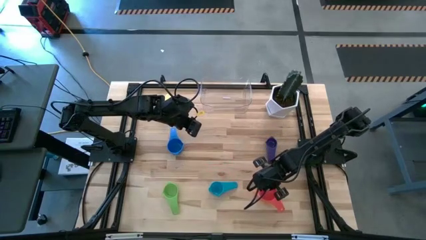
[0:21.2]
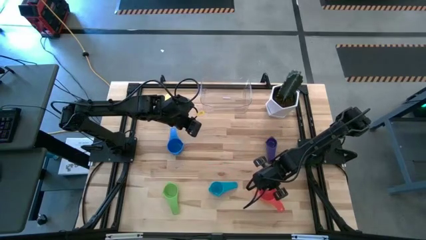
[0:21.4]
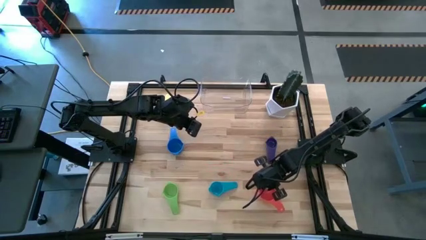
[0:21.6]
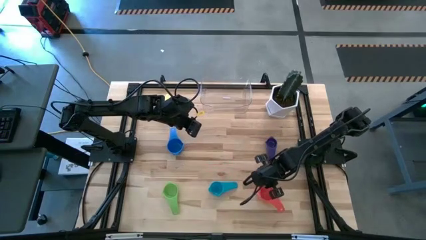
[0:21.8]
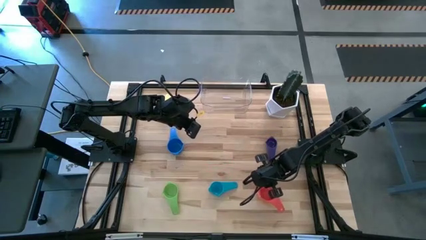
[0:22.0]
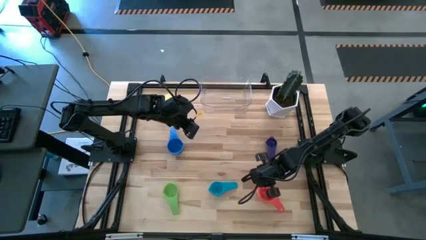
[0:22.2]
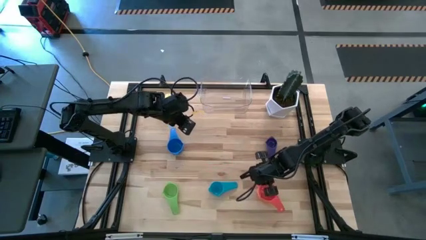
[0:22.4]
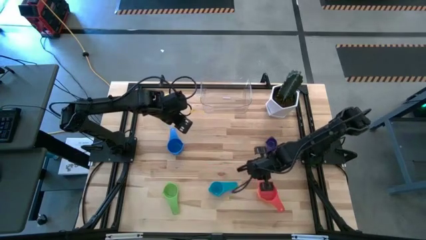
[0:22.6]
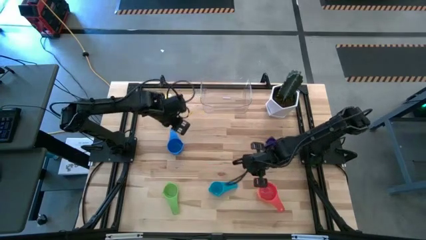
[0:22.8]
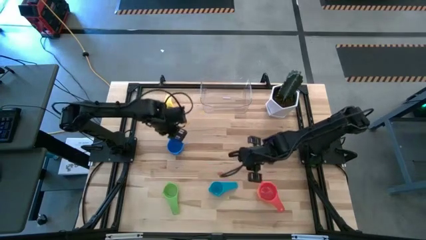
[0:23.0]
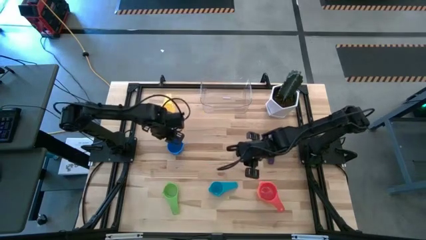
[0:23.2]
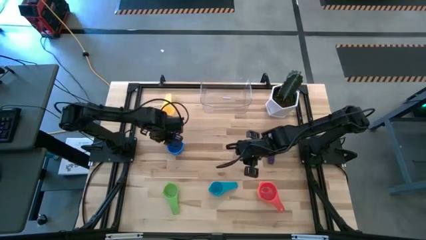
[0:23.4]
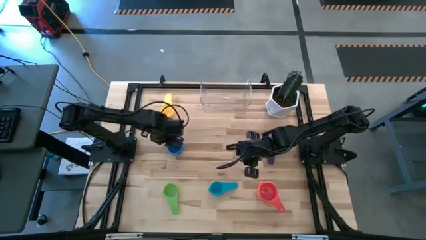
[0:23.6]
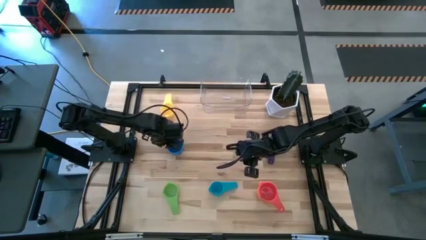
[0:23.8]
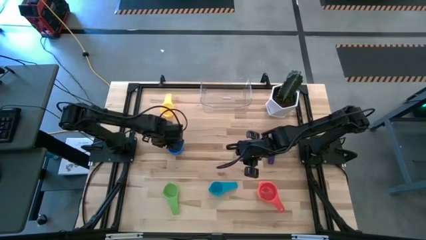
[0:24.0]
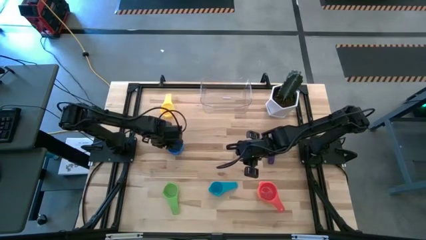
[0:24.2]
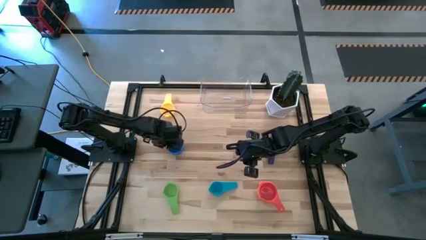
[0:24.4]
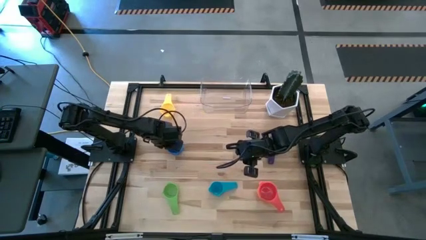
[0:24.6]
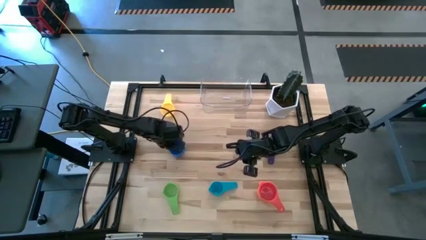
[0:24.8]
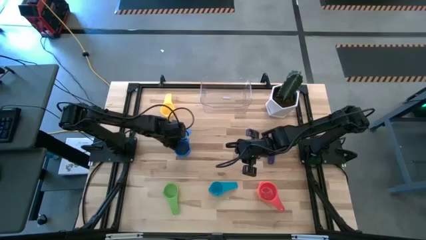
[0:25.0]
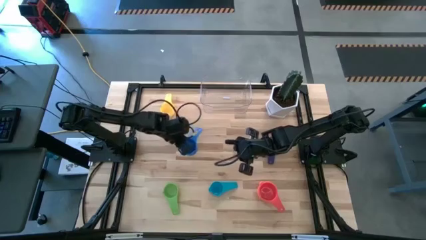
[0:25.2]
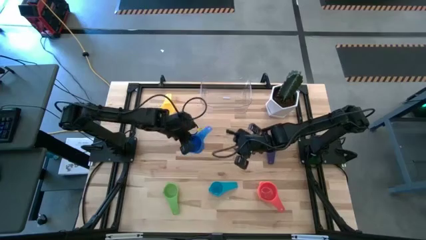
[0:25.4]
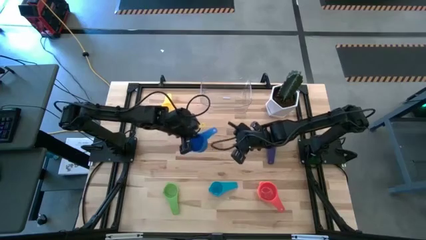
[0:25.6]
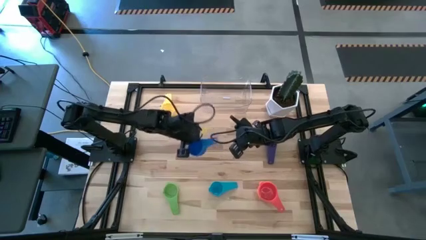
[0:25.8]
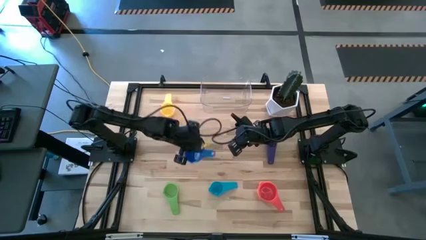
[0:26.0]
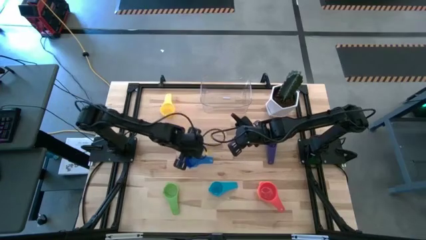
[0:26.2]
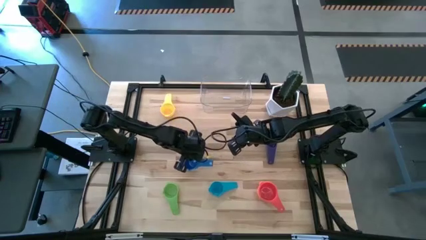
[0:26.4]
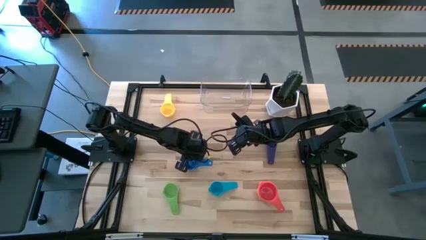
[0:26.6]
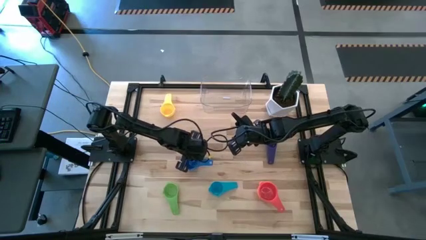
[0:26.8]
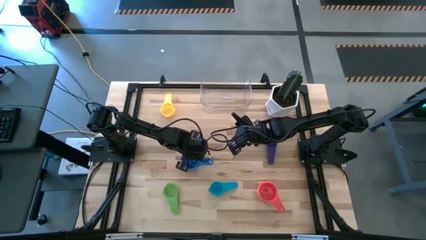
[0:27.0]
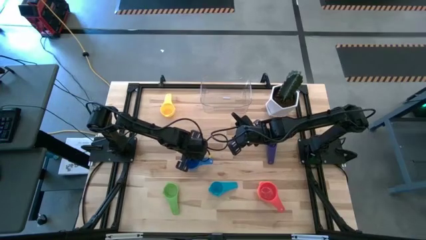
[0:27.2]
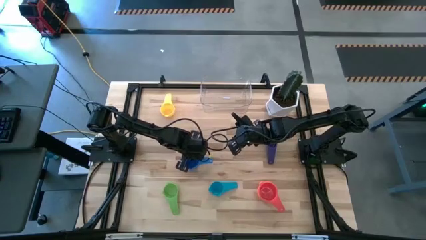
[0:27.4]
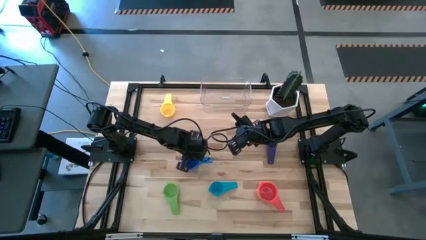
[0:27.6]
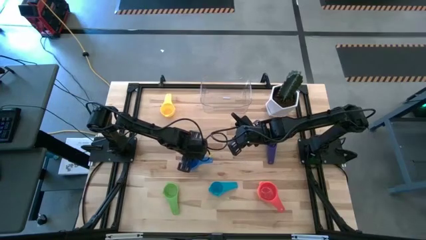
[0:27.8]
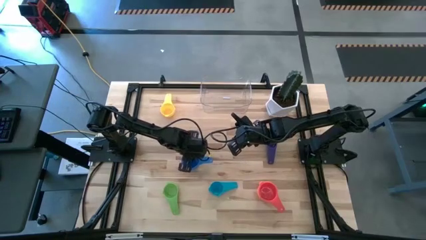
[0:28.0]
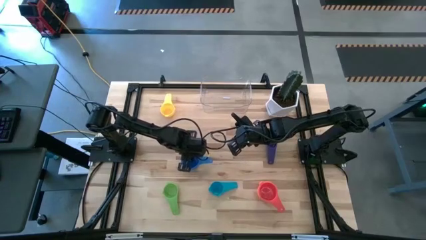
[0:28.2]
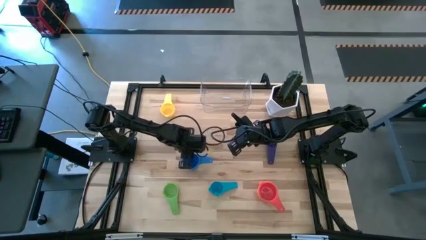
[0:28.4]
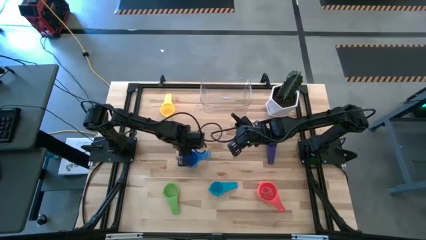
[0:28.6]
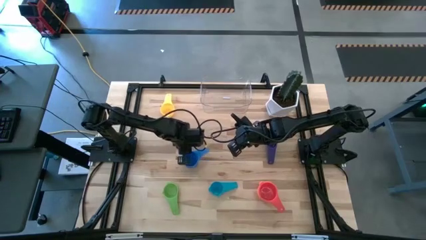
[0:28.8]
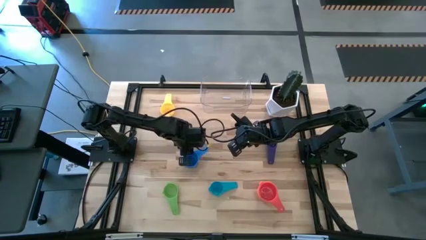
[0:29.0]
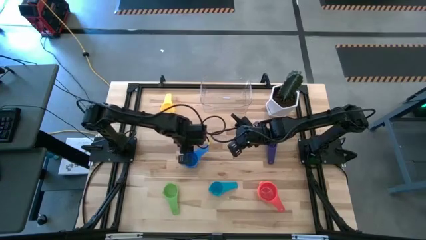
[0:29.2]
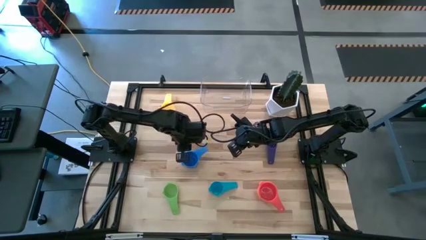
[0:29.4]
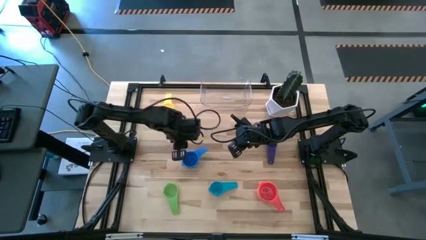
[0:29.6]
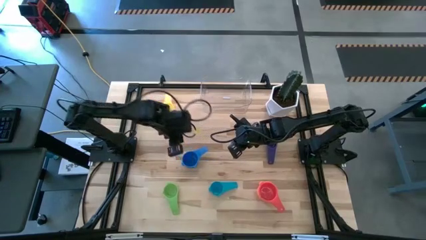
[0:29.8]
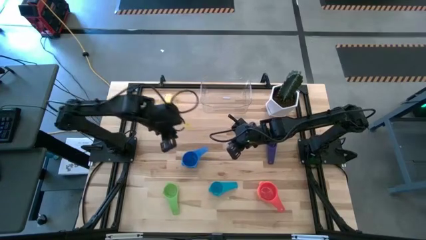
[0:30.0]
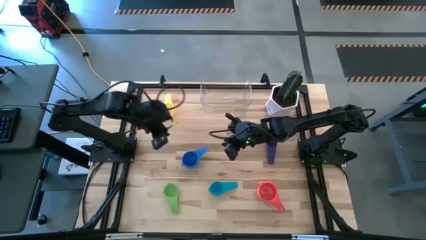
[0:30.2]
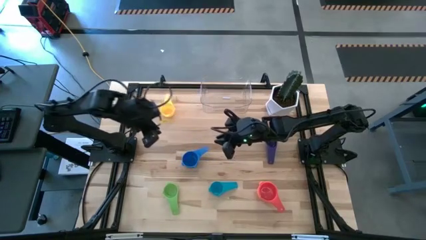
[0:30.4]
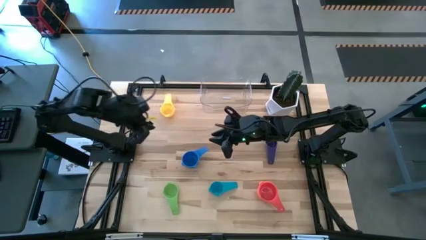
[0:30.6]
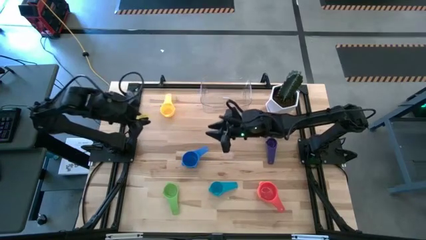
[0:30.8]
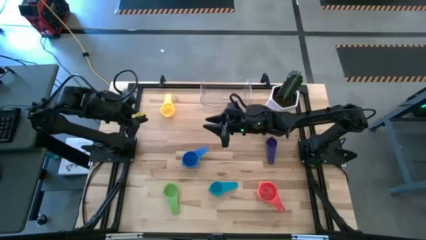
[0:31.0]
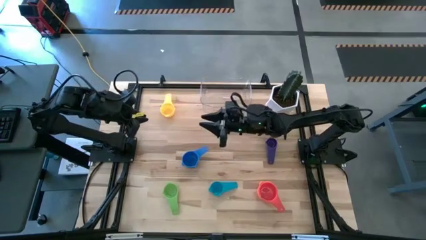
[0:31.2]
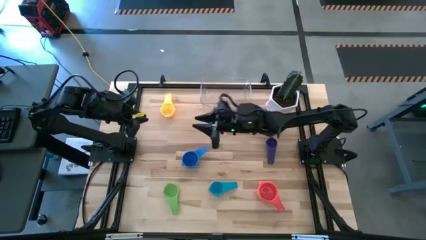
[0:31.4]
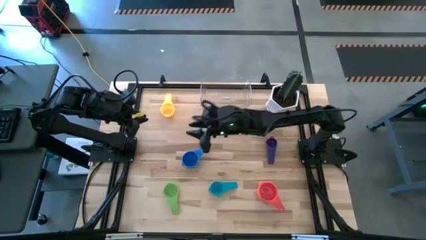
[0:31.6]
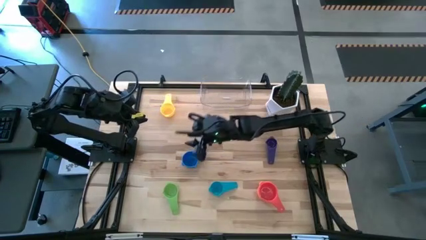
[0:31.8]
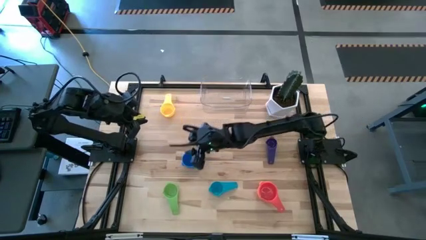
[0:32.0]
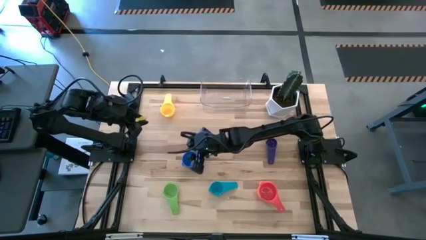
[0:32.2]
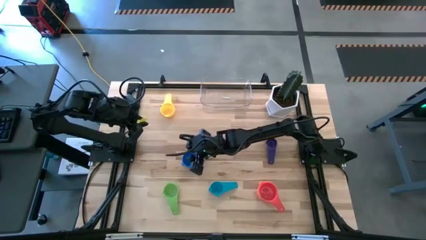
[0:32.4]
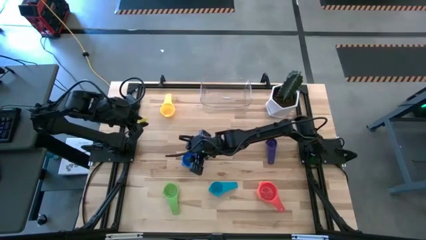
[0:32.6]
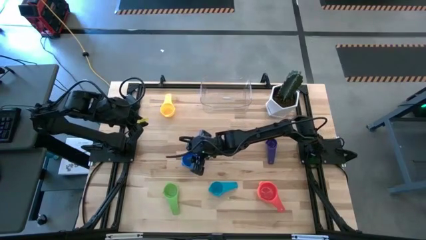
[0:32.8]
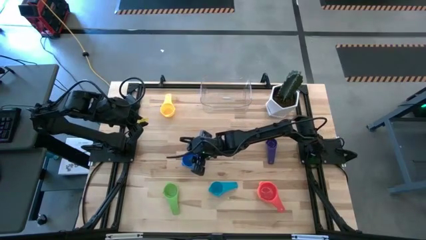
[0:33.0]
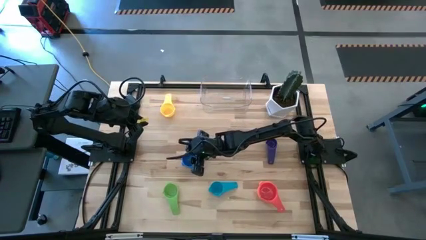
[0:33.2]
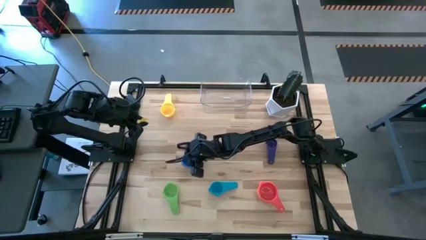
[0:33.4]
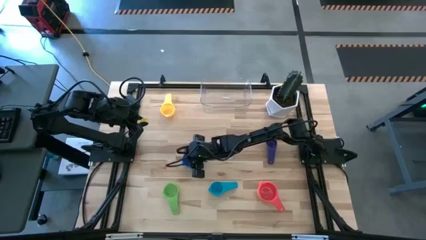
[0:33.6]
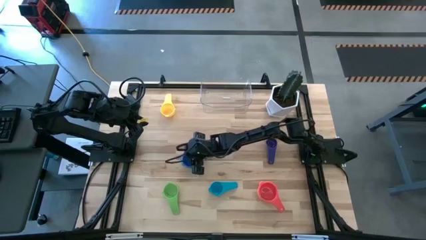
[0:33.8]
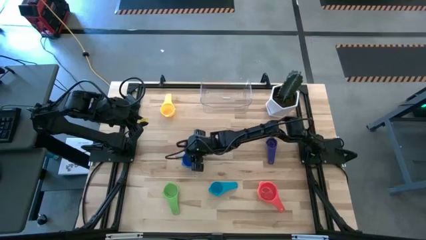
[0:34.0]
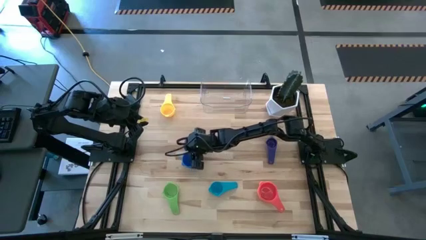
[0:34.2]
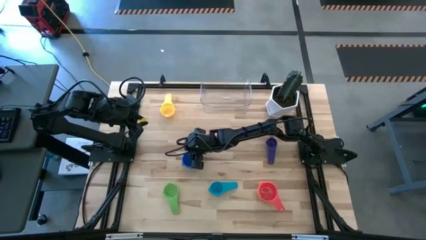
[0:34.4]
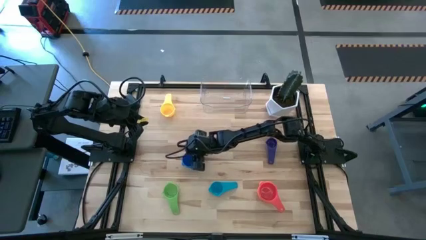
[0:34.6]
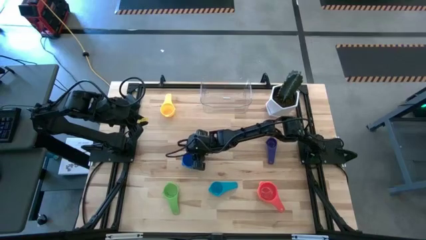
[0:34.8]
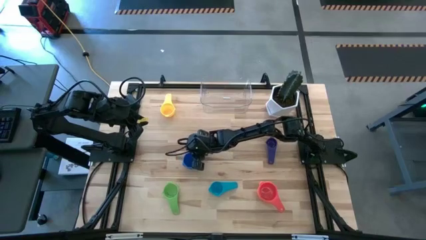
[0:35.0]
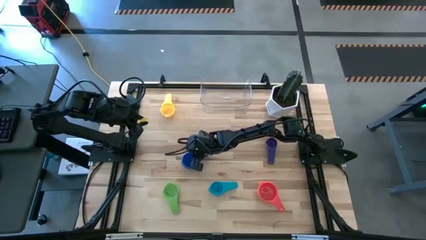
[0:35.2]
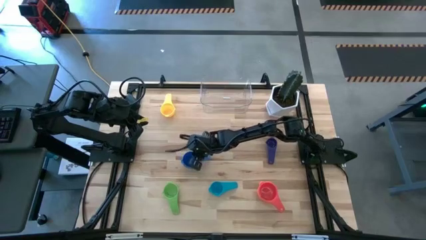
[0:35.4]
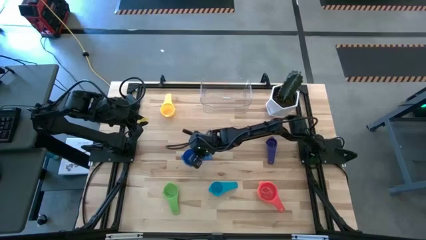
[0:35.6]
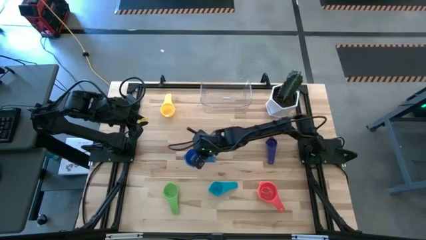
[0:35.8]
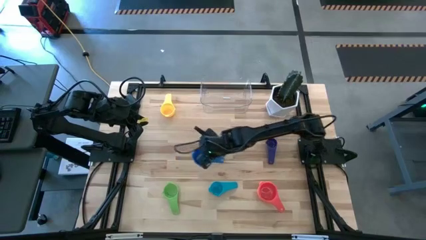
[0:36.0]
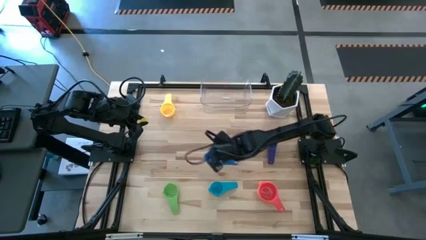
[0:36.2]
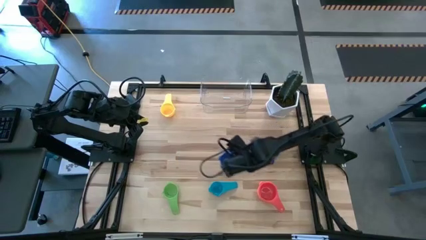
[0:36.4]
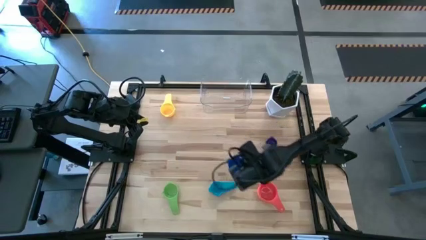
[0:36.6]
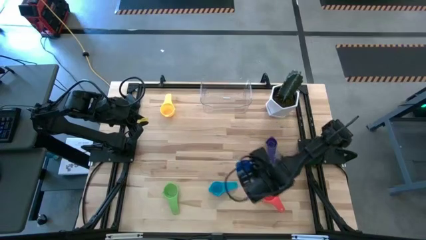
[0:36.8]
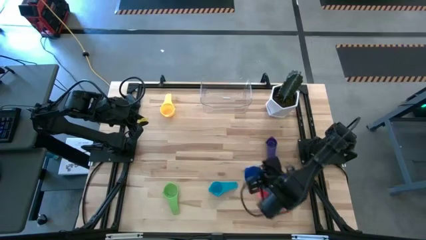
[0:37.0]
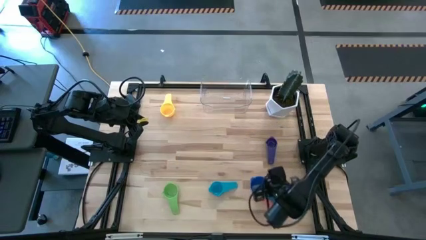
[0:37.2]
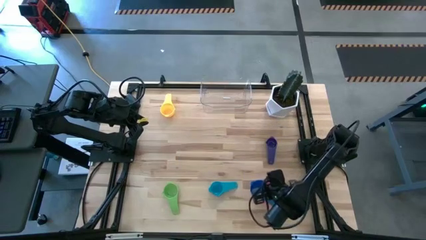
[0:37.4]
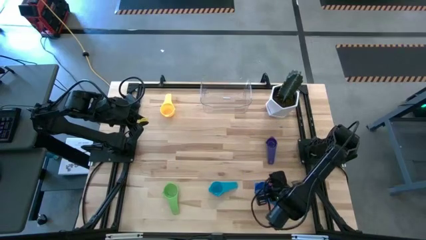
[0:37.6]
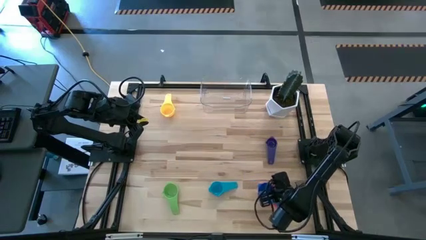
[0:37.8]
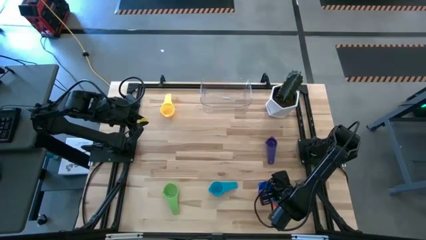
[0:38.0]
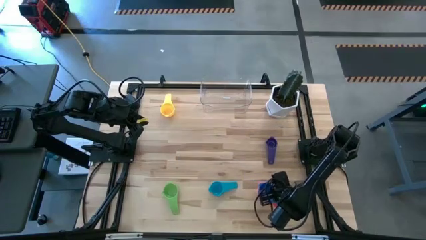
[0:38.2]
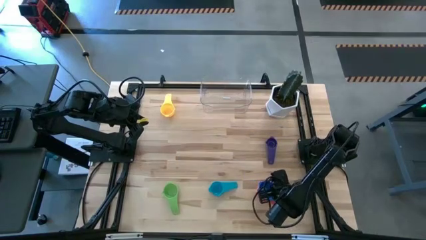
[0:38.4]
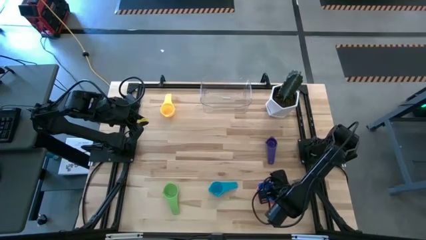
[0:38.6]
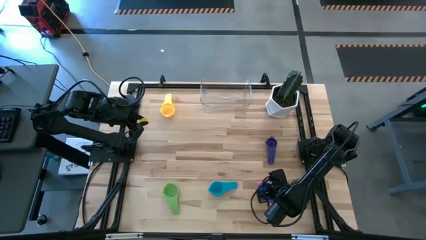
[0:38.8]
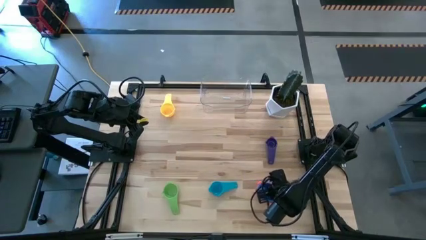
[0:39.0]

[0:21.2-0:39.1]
Task: Nest measuring cups in basket
Stack the blue measuring cup on top of the red measuring cup
